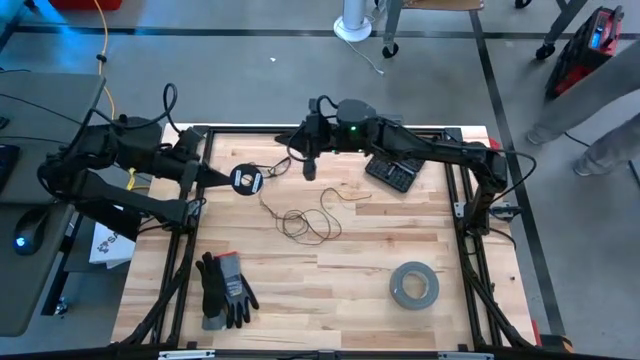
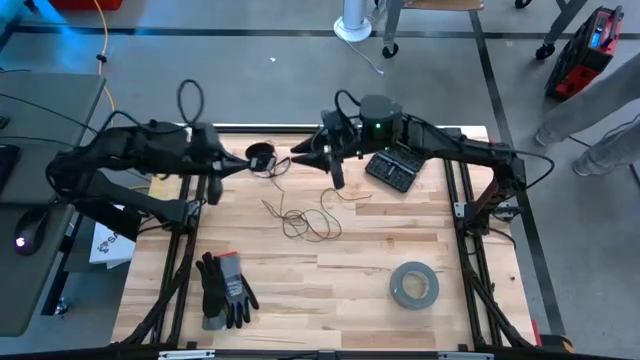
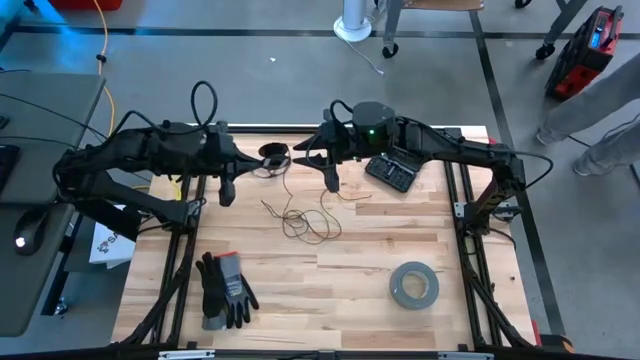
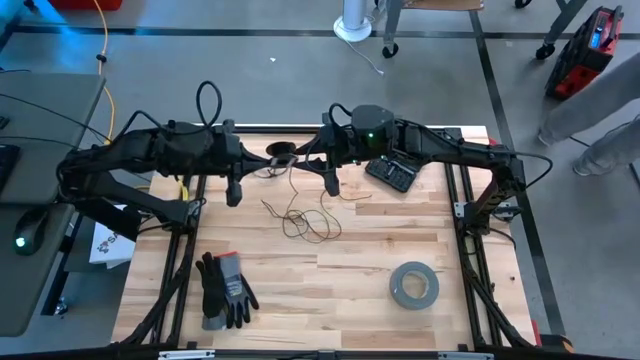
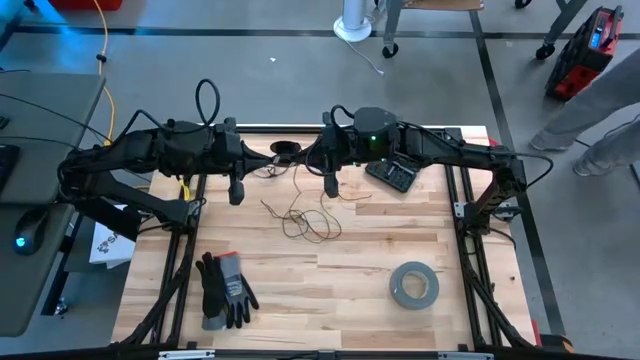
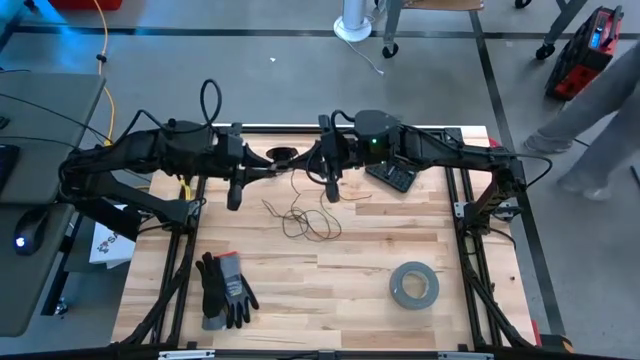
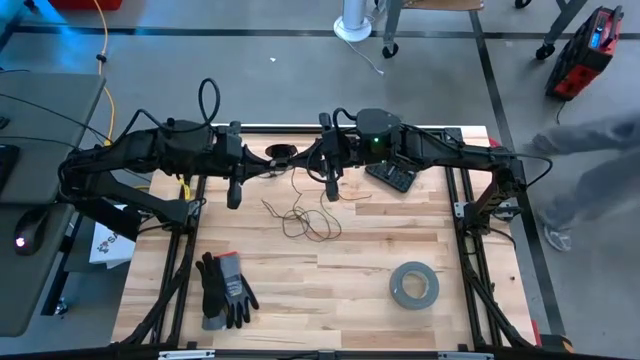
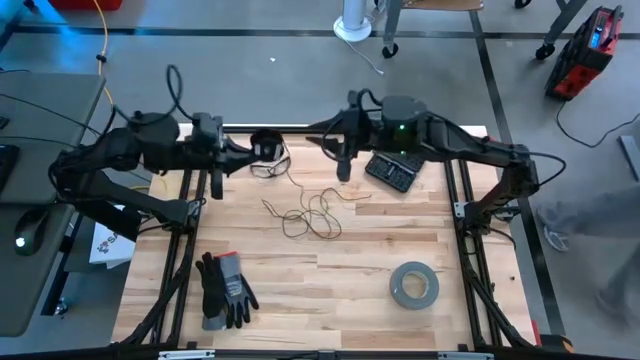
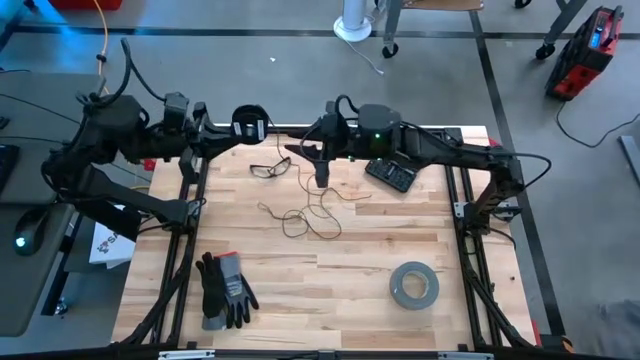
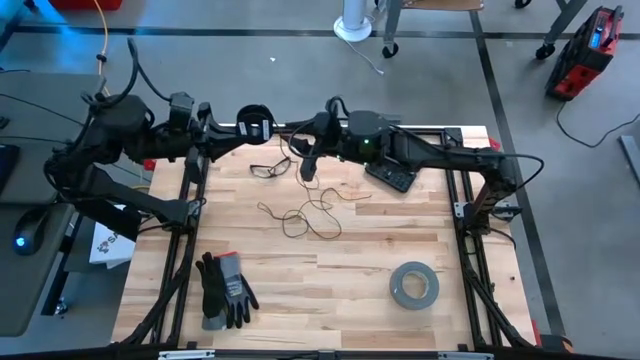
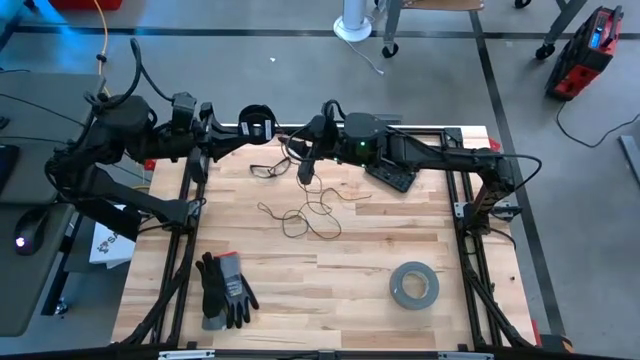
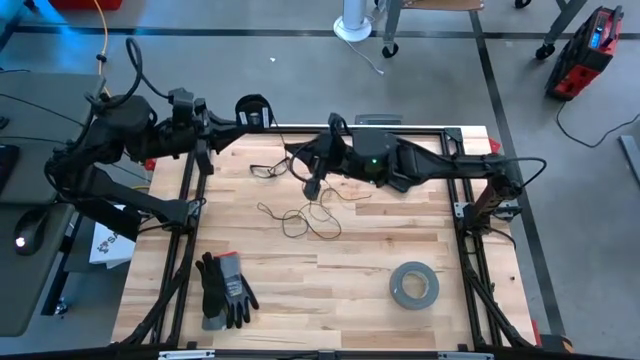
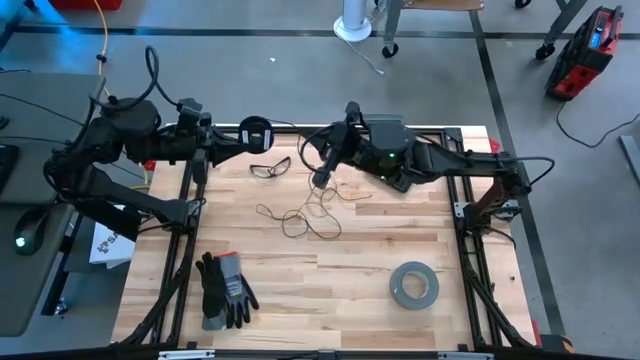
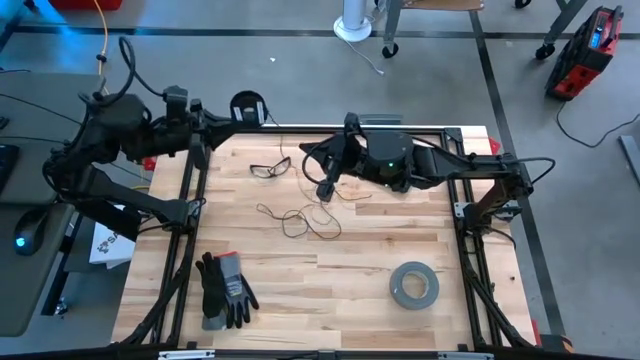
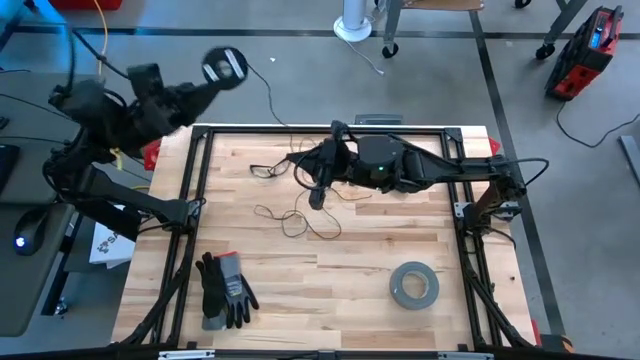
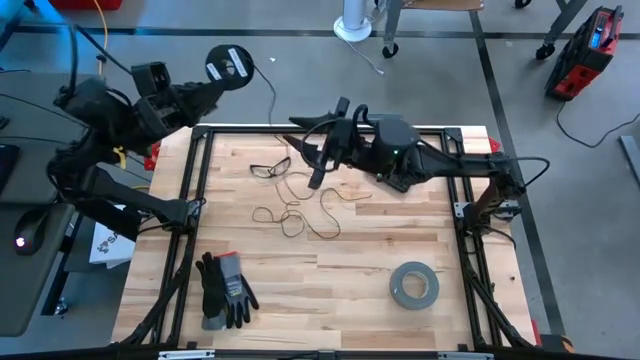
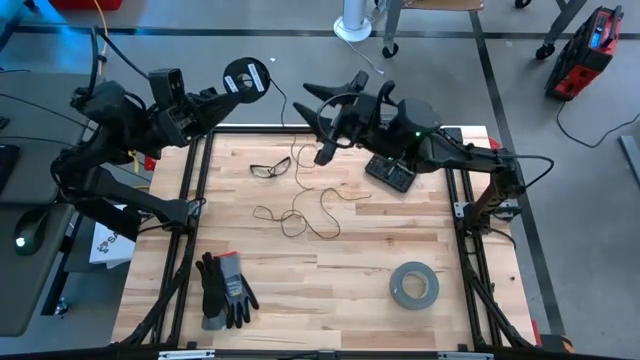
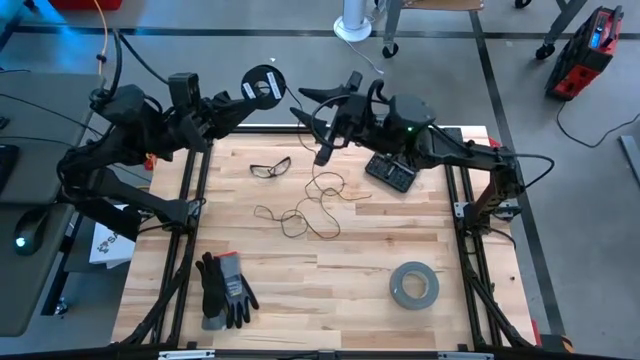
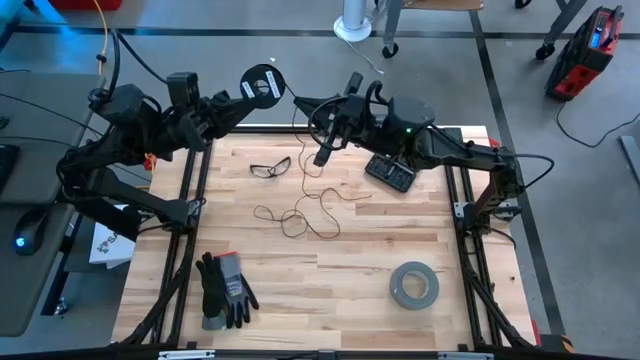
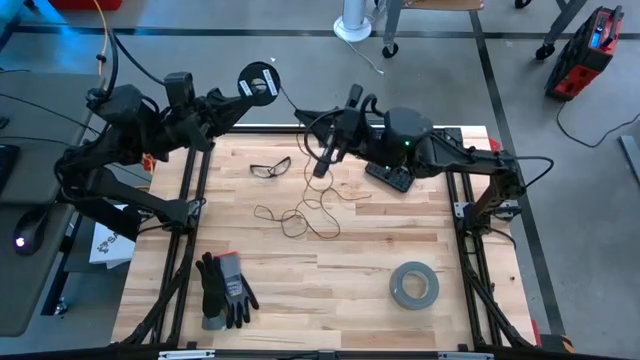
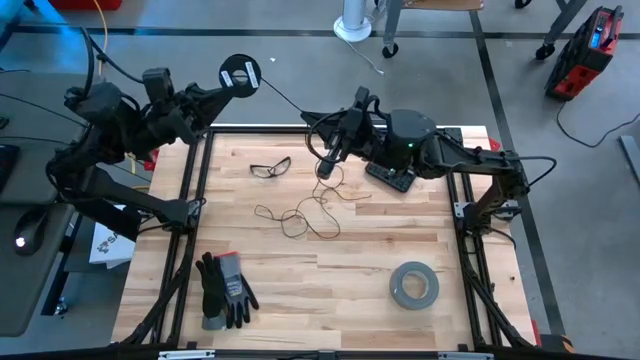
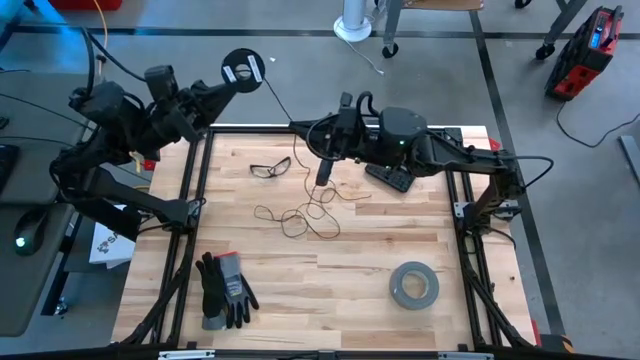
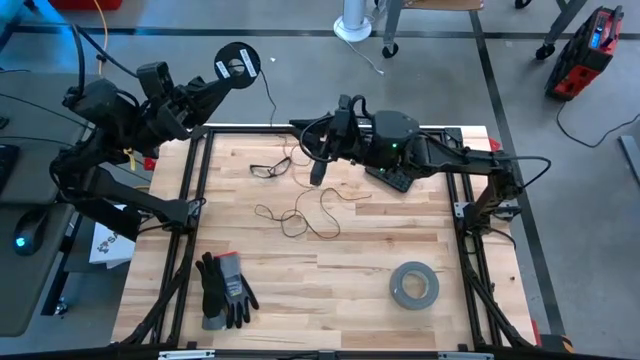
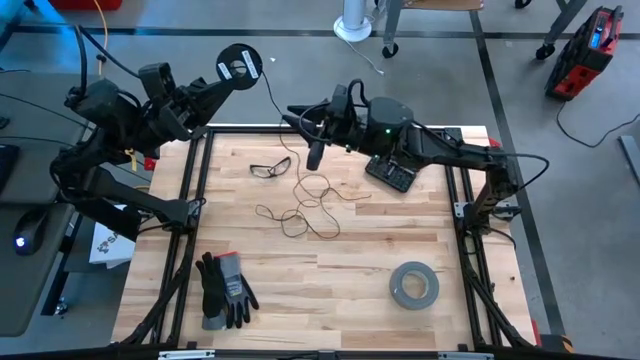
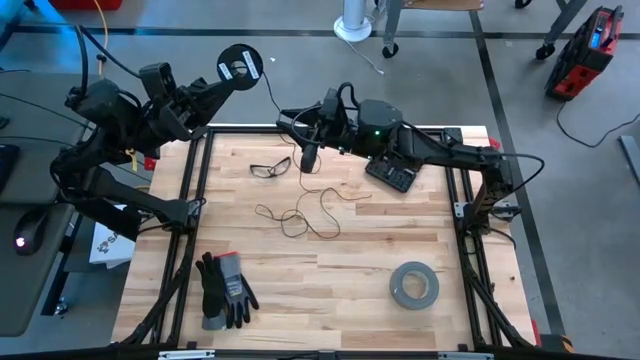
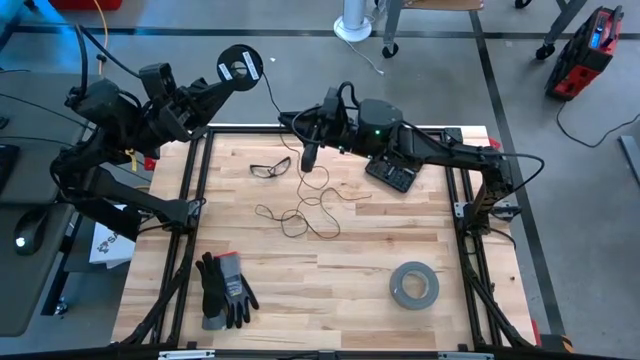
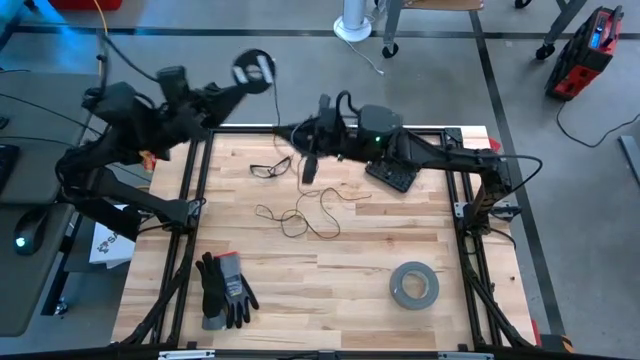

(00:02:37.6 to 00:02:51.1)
Task: Coil cords
Coil the black wire on the black spool
